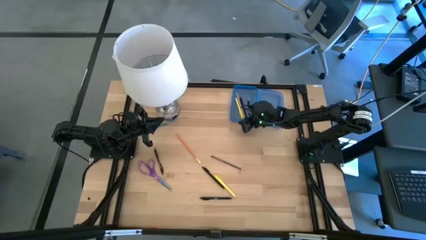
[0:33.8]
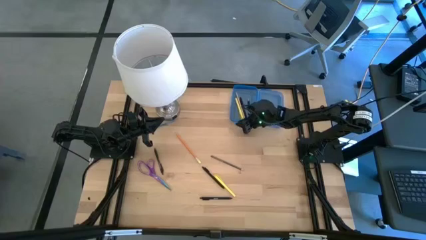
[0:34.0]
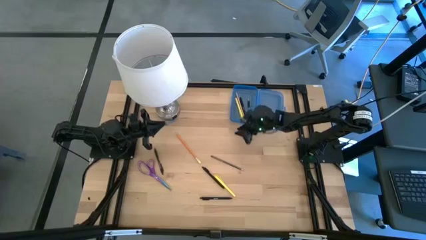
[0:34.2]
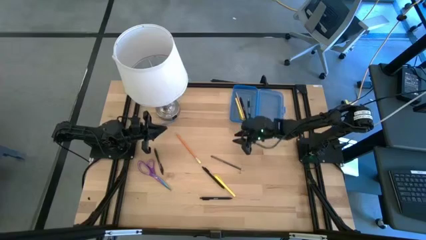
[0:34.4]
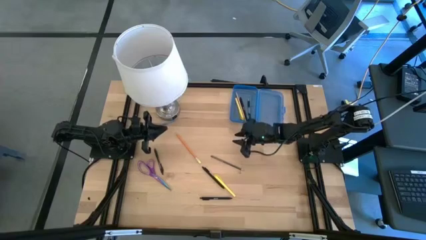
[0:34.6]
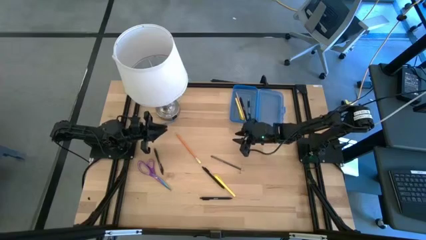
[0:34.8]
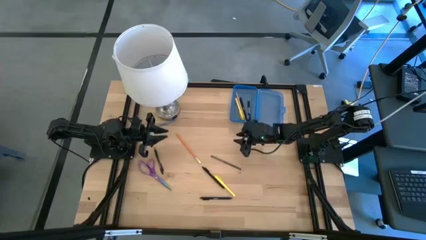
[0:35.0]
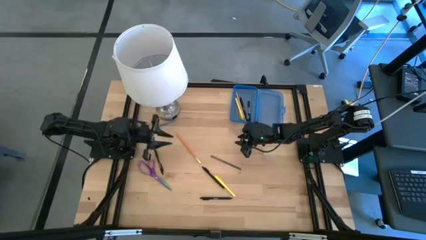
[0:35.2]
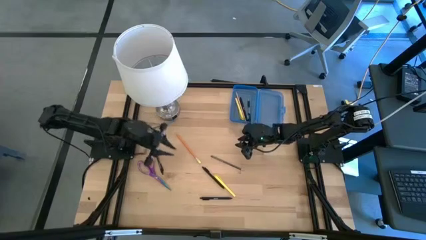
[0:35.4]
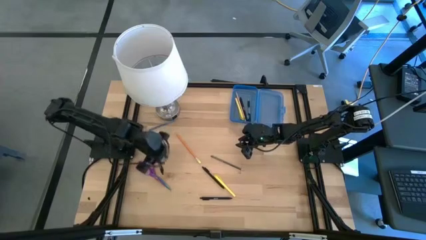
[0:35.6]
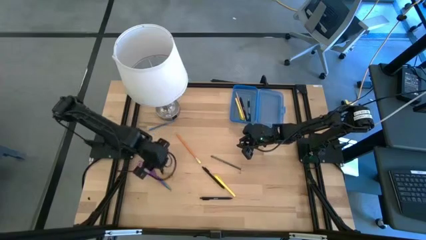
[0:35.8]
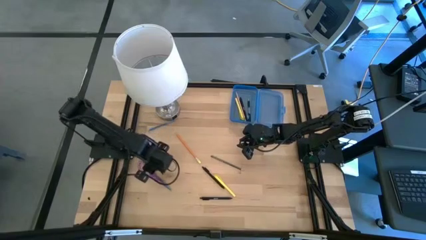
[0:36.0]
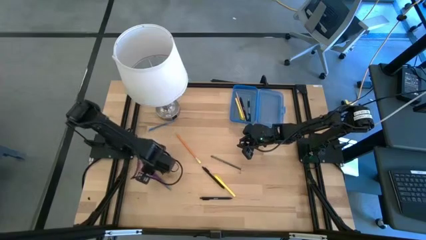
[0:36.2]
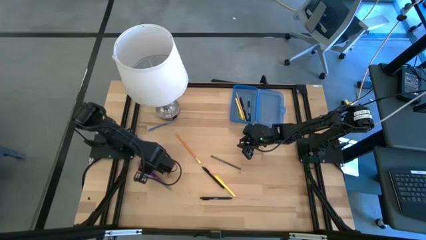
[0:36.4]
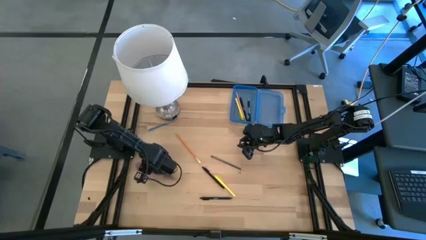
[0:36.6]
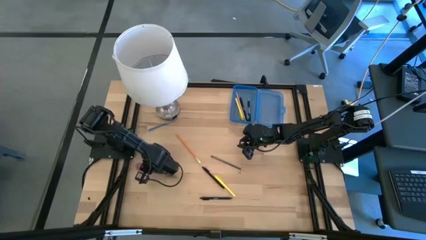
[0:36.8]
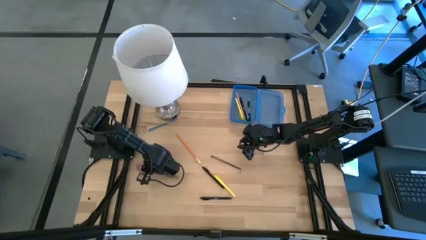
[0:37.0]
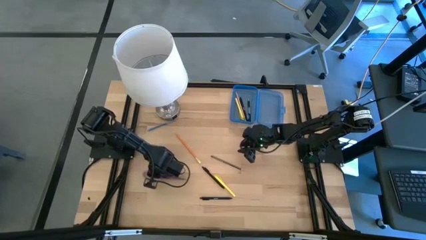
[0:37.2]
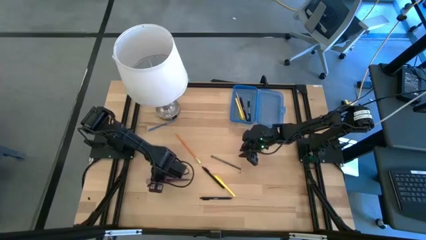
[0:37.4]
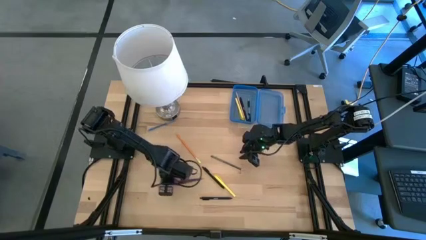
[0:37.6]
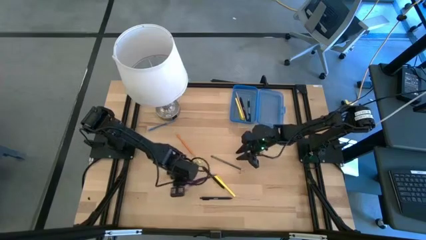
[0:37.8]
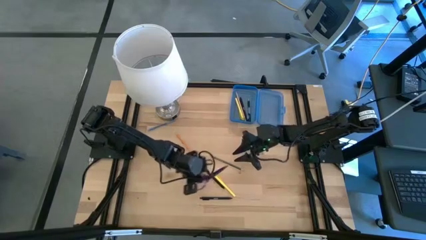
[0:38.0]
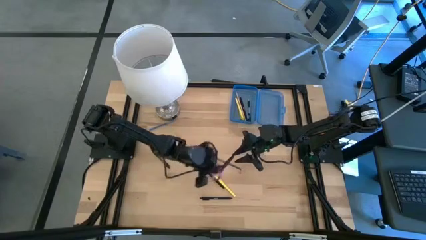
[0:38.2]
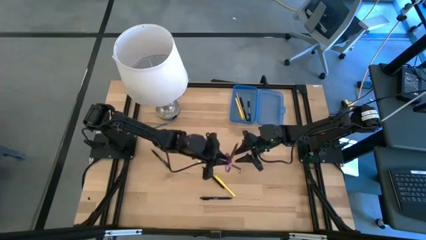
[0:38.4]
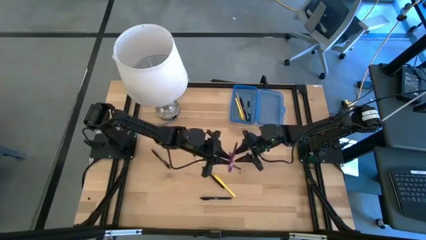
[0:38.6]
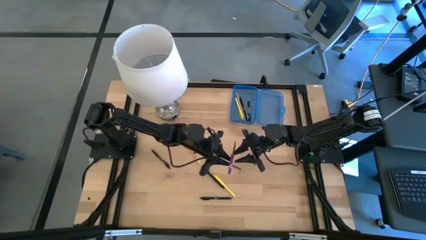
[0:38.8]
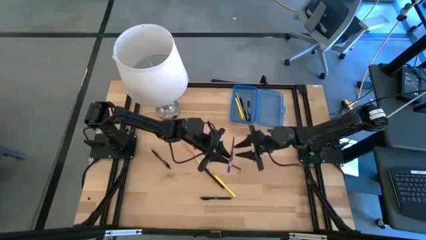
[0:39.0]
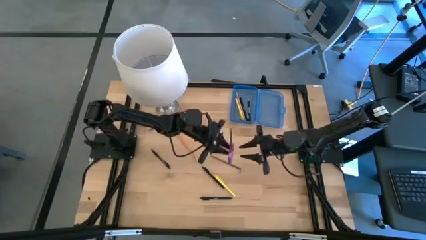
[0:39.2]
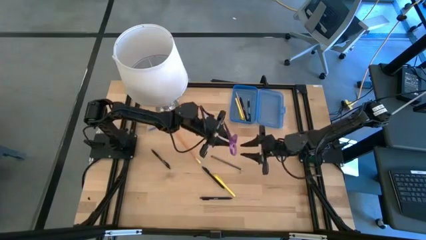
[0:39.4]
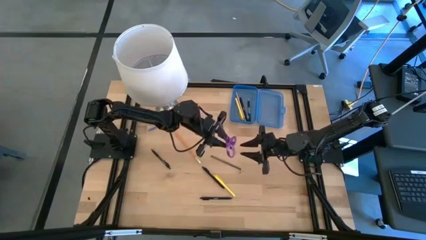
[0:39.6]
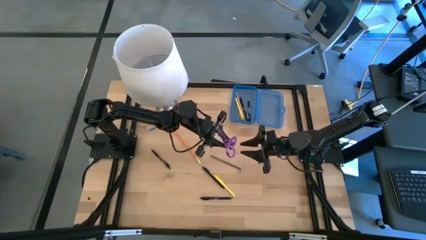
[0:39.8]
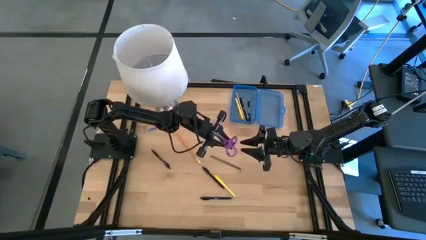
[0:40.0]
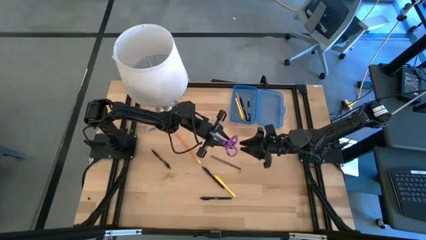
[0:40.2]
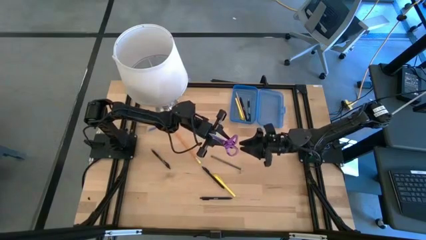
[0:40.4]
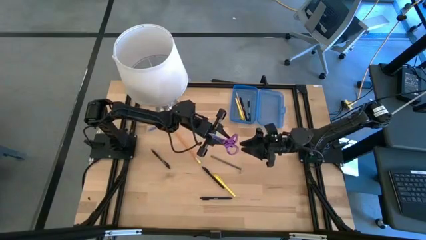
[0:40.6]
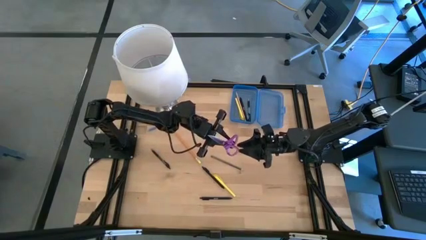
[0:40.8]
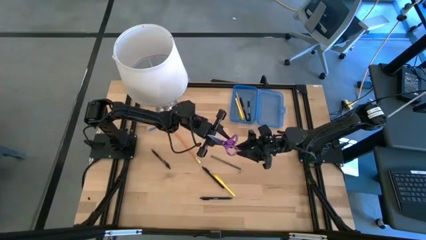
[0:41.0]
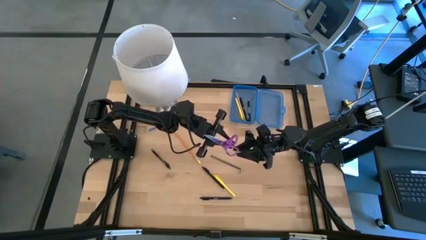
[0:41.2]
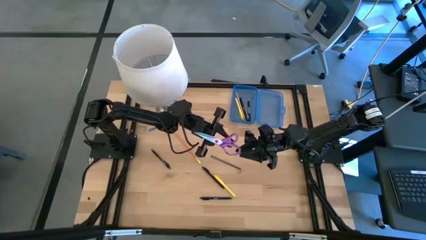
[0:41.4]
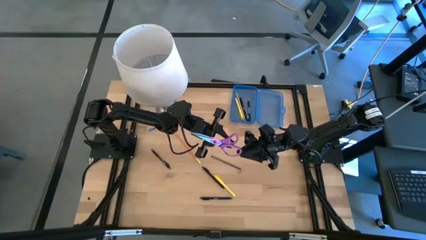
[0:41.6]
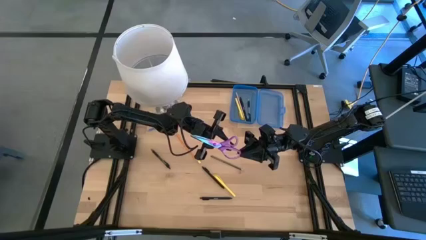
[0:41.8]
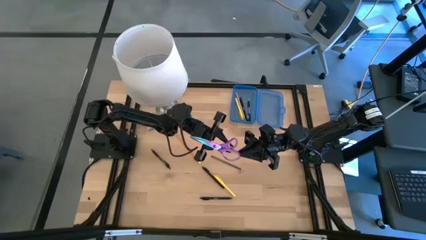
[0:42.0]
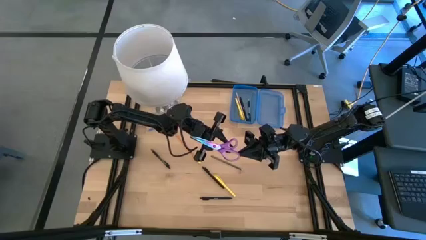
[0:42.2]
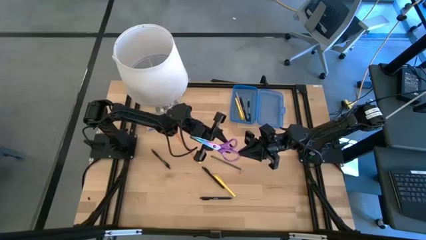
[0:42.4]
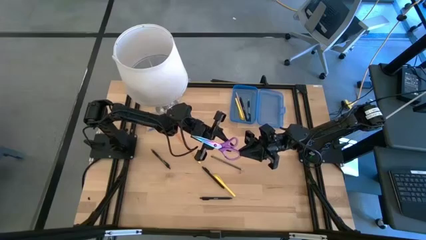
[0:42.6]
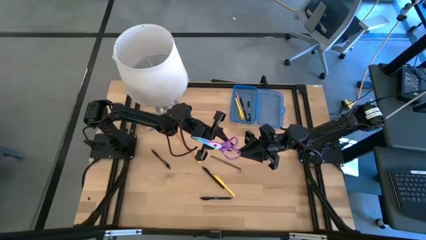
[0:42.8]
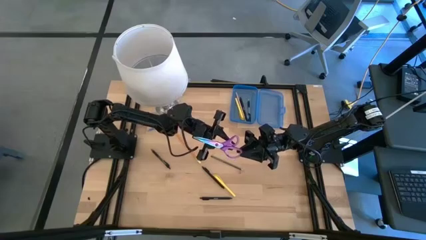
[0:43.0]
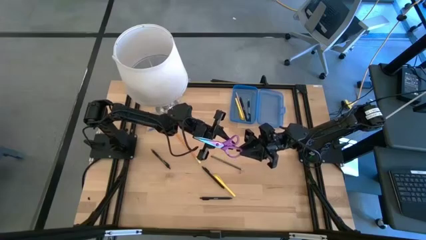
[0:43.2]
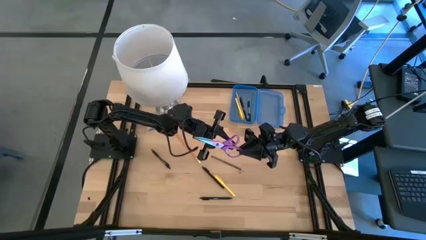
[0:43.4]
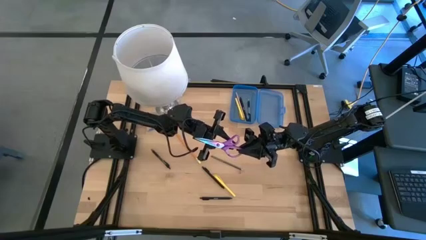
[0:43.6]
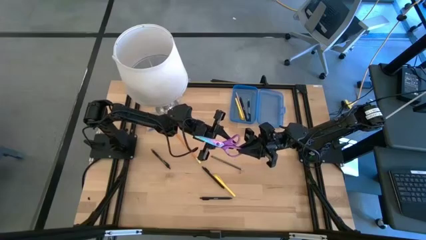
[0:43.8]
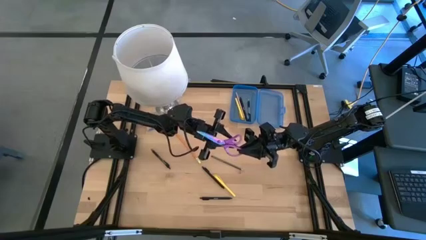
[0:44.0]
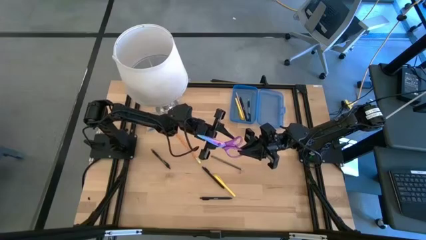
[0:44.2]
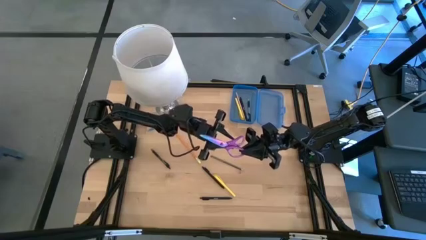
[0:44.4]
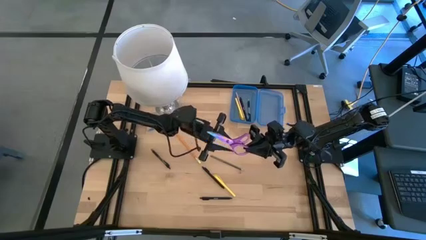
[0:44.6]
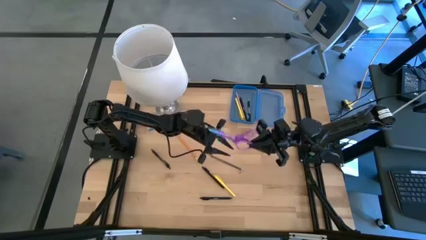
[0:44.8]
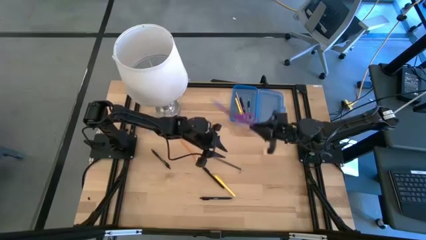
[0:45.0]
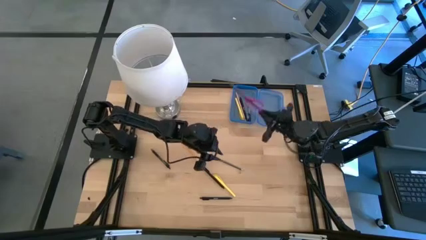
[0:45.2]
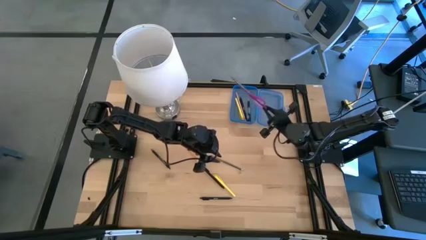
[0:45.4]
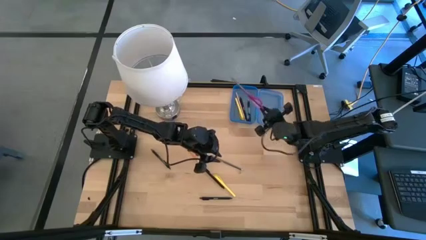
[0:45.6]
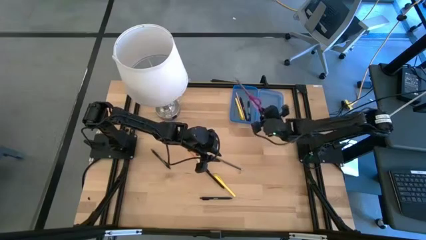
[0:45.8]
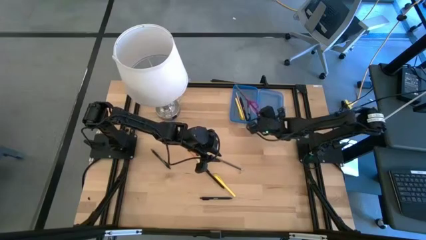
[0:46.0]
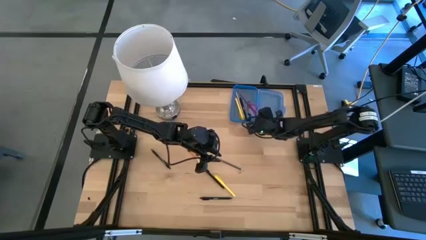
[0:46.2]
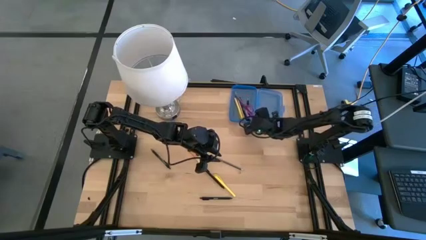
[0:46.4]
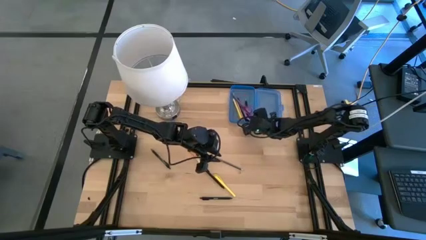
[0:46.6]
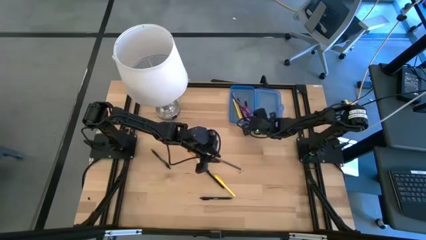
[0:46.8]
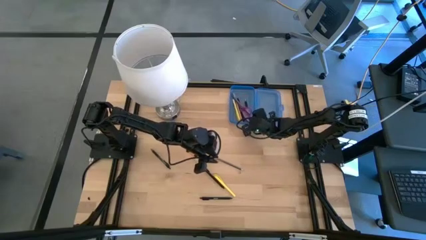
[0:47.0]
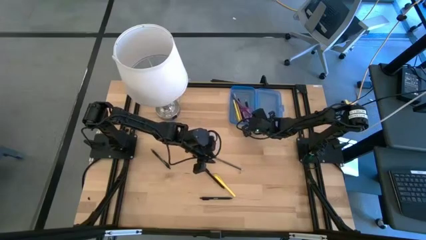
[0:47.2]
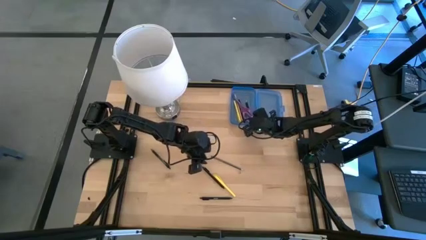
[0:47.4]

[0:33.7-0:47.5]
Task: Pick & place school supplies into a supply box
Put the purple scissors into the blue supply box
